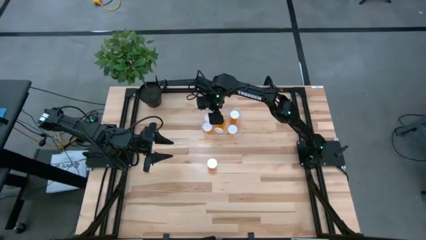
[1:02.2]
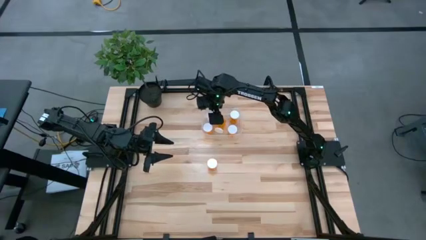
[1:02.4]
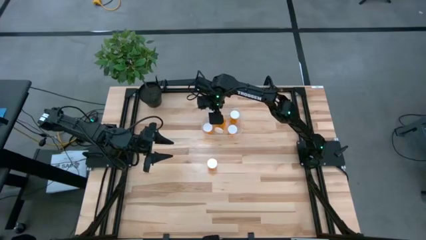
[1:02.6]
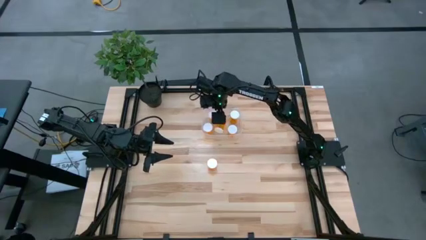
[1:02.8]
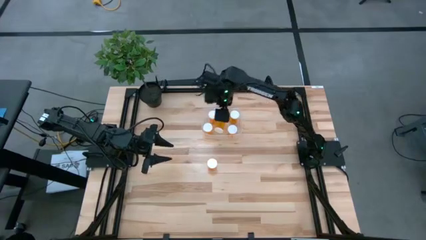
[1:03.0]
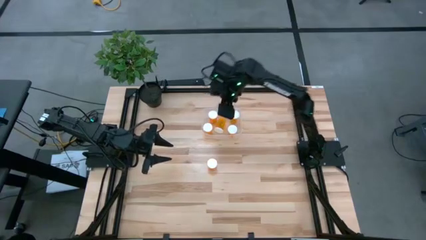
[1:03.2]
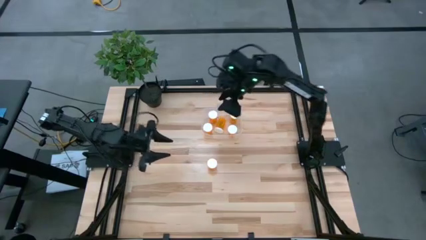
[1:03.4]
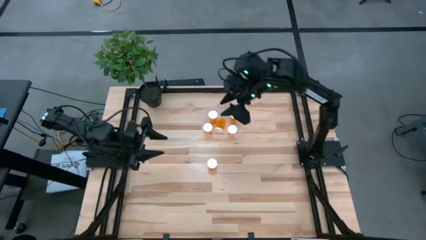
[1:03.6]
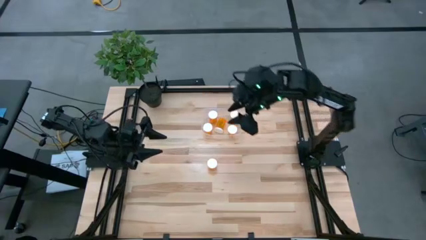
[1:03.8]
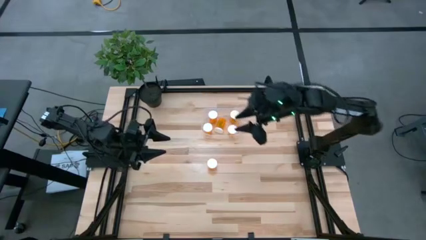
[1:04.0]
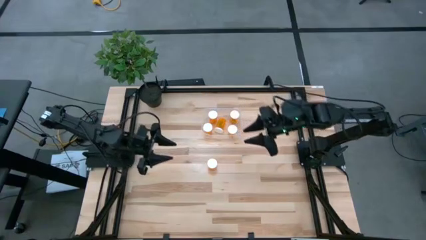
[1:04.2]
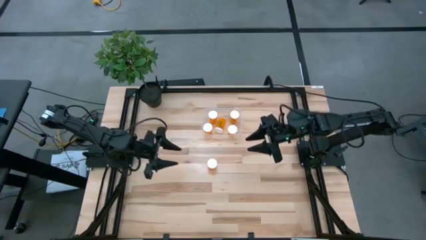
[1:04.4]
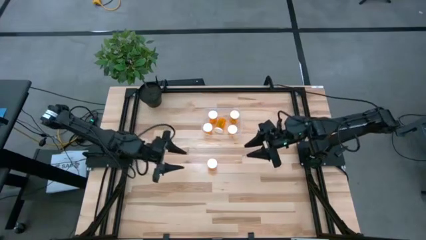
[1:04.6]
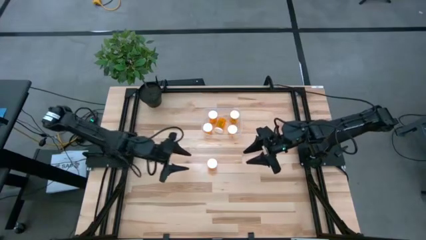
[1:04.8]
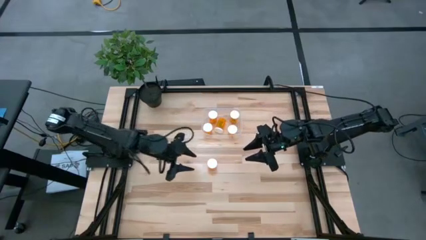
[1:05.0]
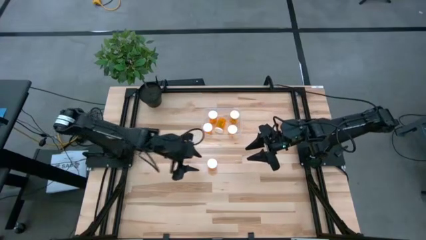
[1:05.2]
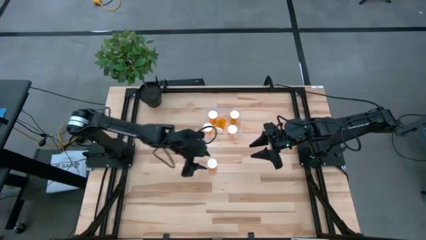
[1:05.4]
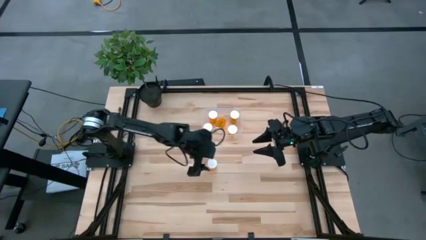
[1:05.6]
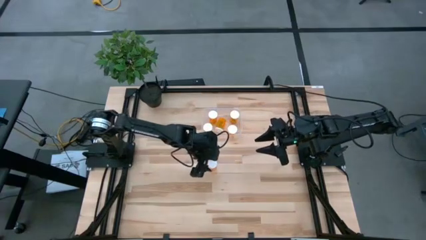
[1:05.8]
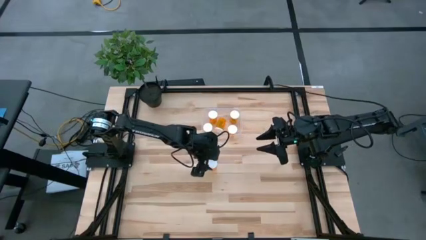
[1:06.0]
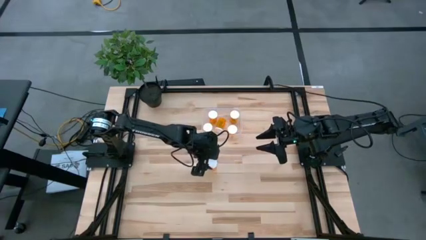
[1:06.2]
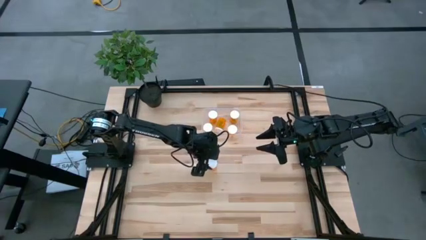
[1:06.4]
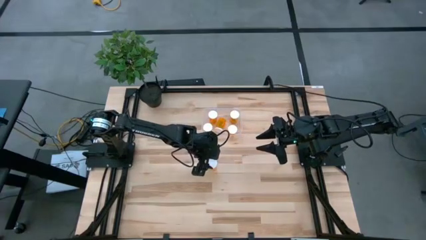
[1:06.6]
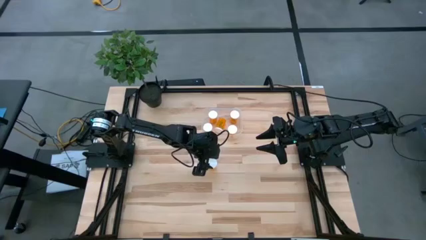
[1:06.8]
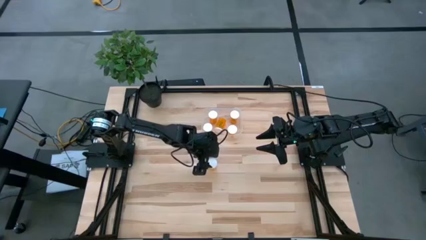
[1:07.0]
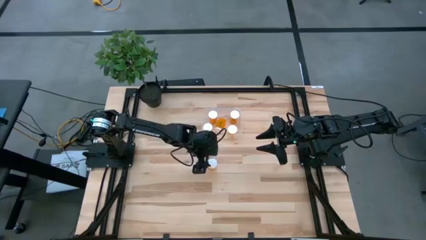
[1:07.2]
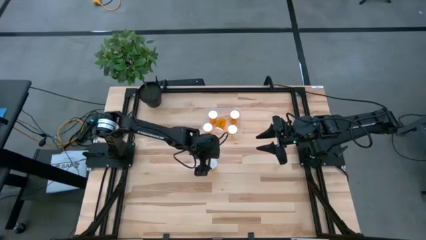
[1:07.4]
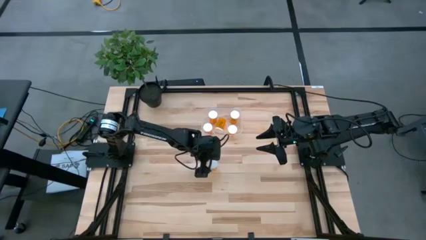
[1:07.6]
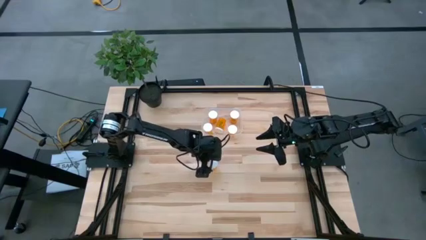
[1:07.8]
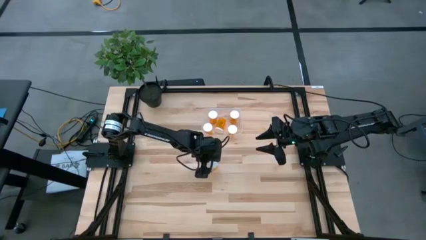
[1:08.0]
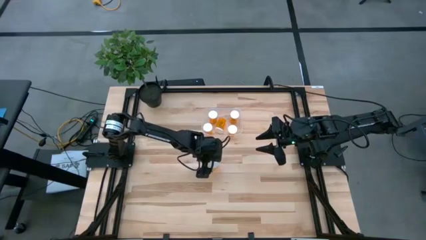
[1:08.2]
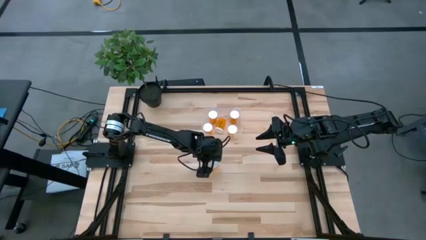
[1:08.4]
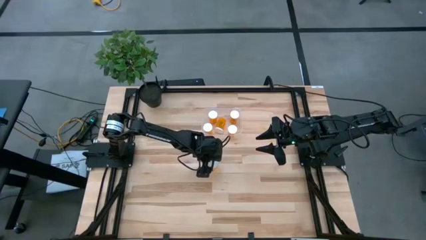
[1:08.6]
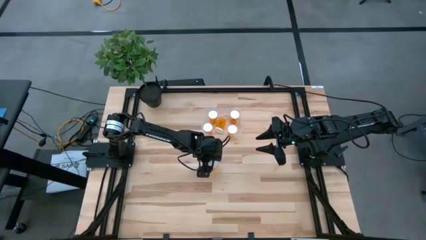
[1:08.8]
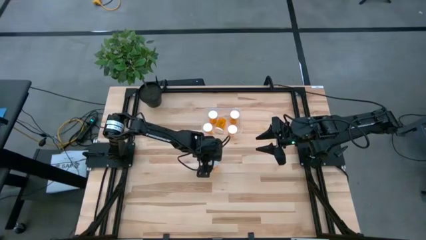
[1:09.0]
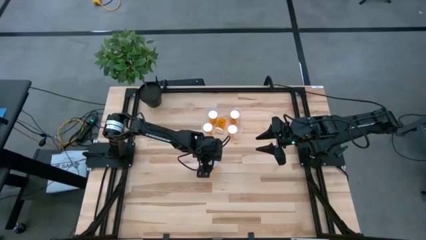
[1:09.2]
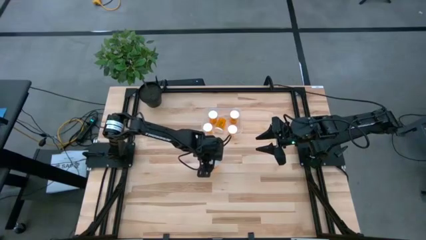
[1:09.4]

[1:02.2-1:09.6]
Task: Pick and place pill bottles into a basket
Put the orange pill bottle into the transparent bin

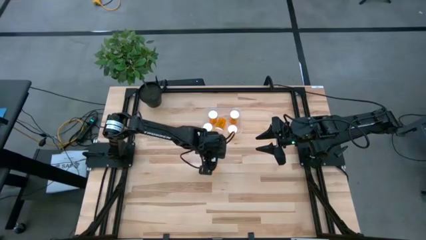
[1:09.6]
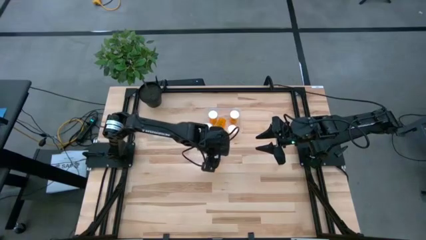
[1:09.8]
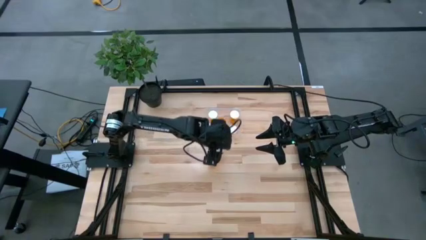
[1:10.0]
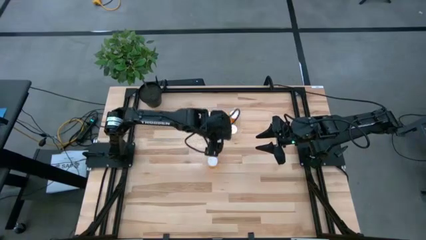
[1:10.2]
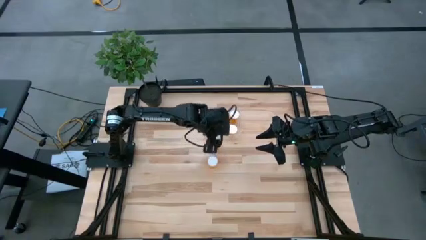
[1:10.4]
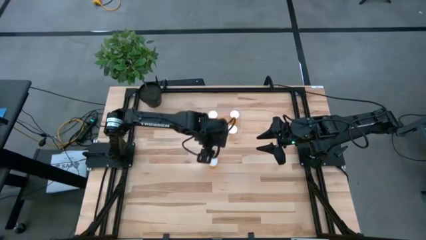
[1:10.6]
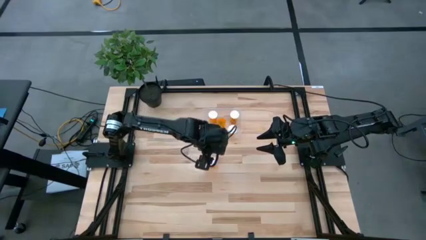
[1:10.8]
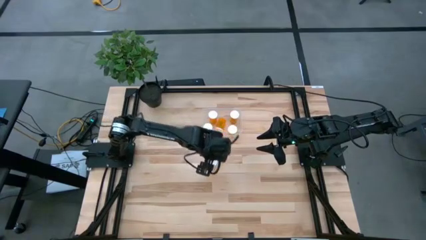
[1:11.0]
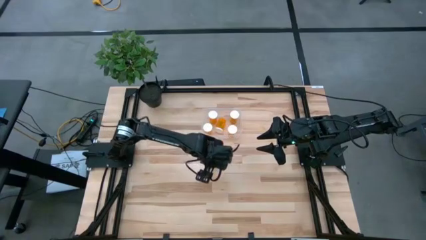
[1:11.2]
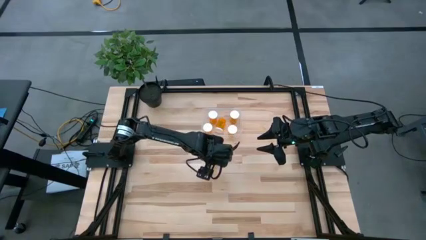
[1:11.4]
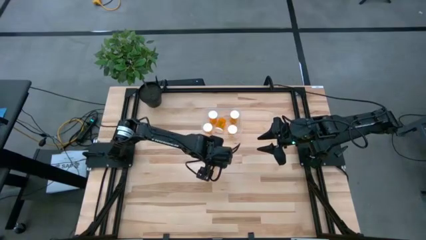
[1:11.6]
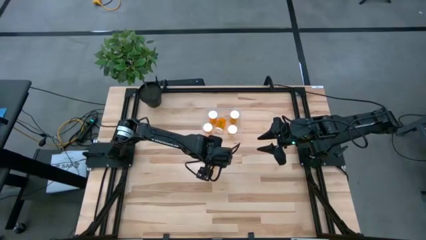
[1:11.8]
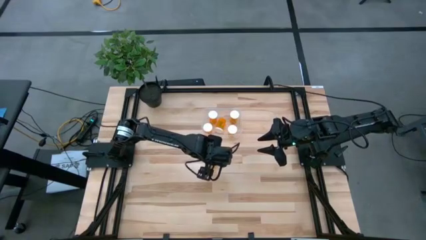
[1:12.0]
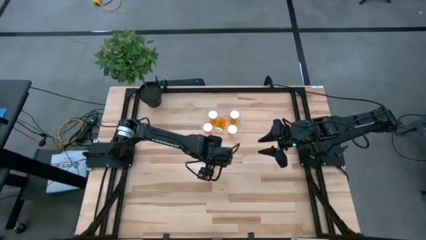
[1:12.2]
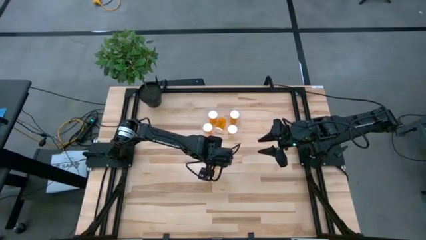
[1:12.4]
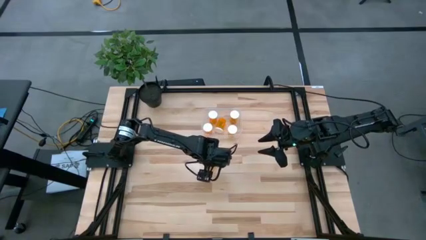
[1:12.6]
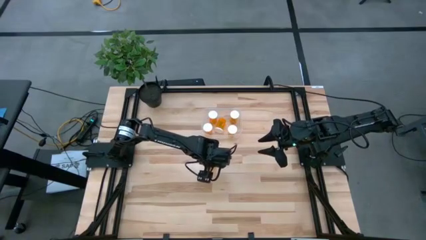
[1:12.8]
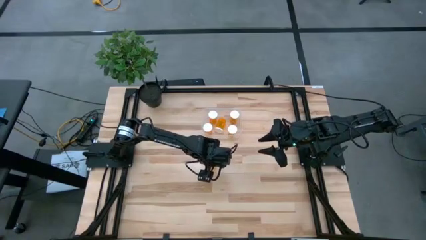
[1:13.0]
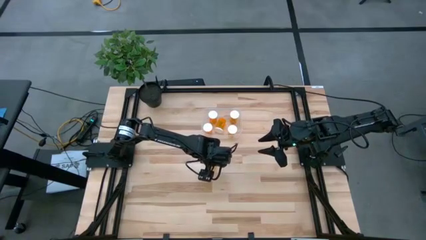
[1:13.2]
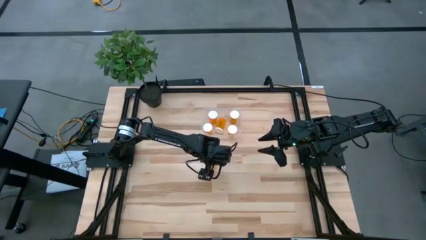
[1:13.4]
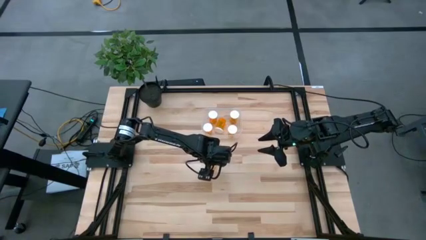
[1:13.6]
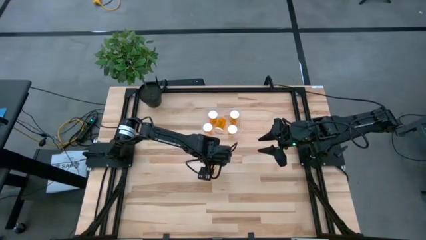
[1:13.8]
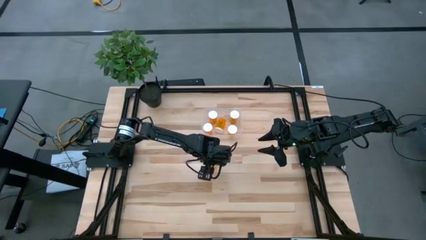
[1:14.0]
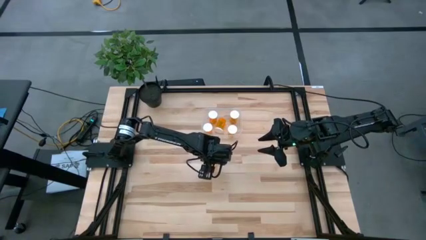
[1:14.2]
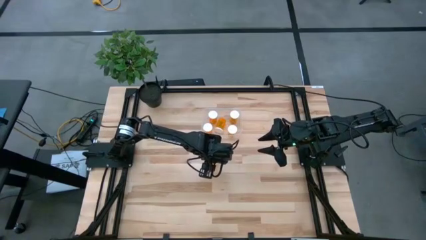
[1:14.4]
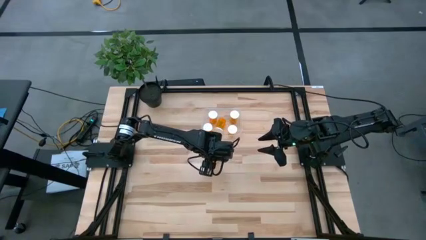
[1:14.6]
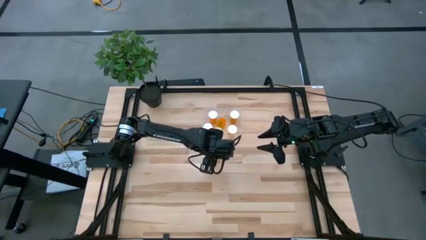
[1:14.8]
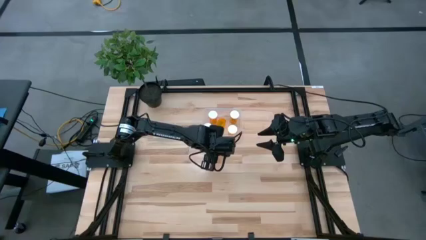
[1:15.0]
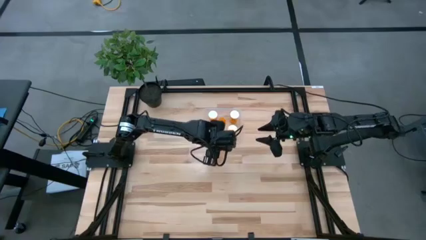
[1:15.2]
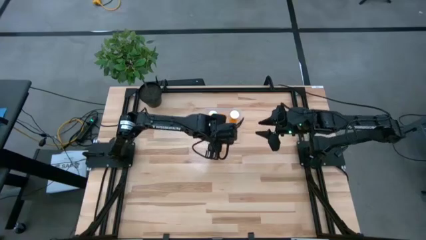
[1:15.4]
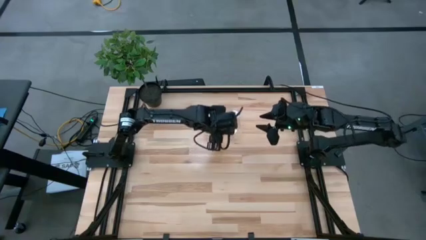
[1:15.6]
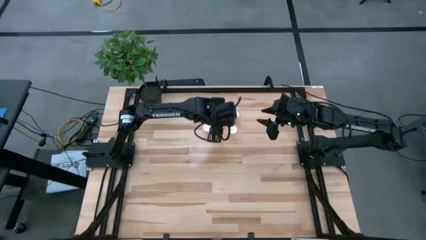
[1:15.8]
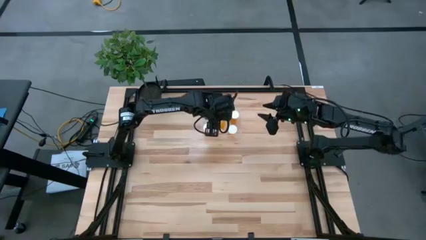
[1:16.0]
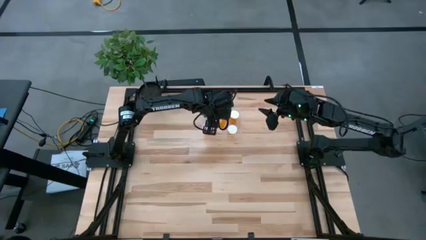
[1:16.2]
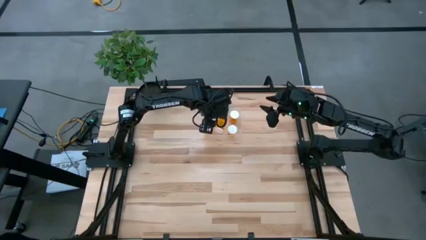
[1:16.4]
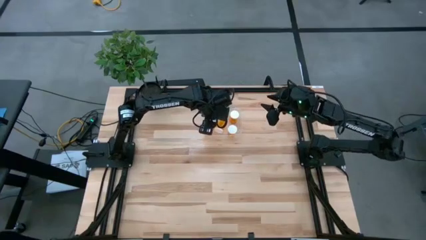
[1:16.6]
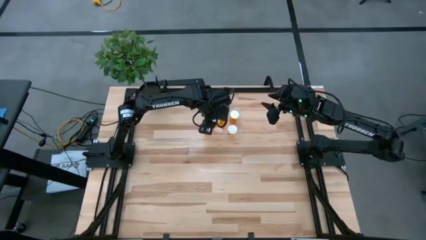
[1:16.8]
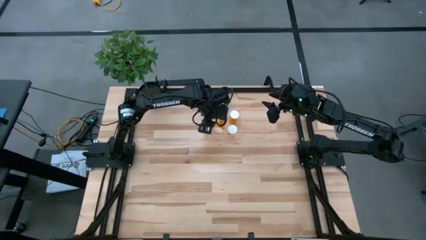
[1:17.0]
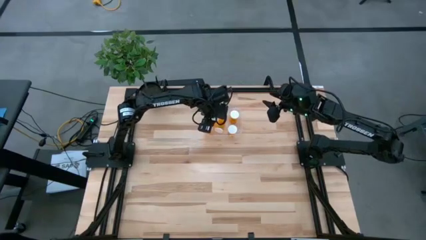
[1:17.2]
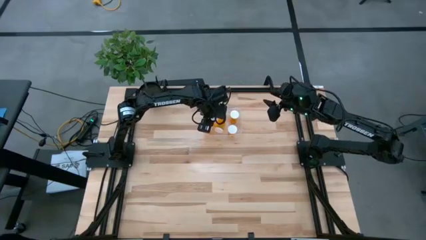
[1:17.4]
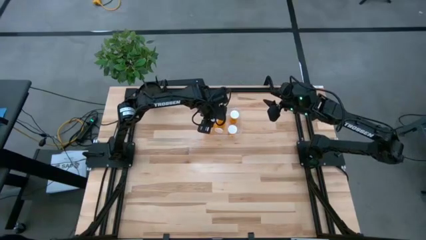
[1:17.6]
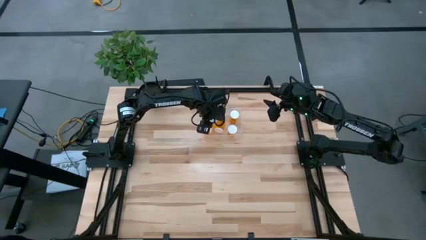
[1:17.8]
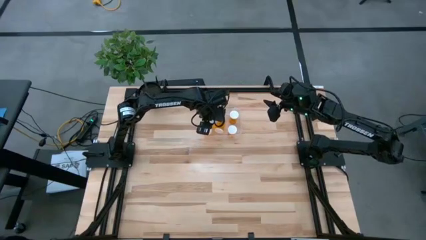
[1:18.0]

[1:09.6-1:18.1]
Put the orange pill bottle into the transparent bin
